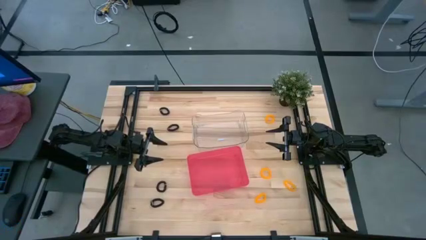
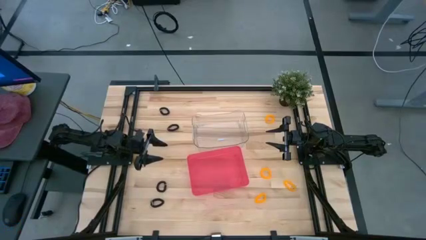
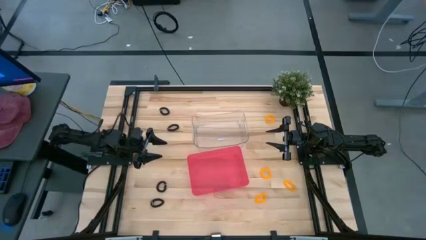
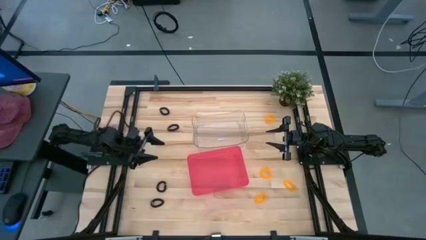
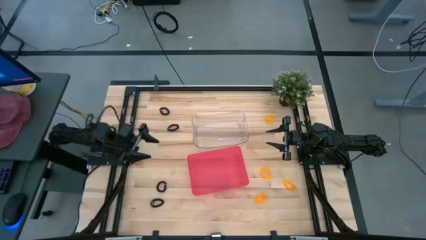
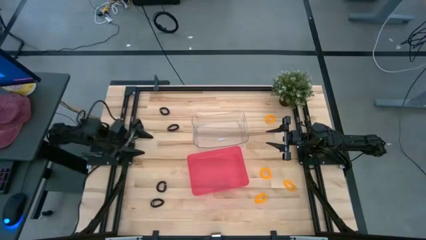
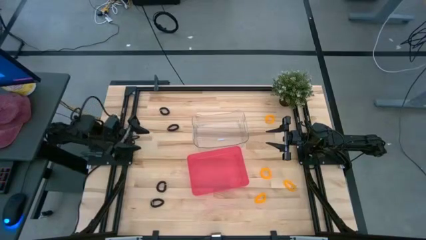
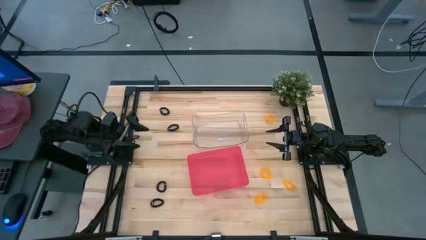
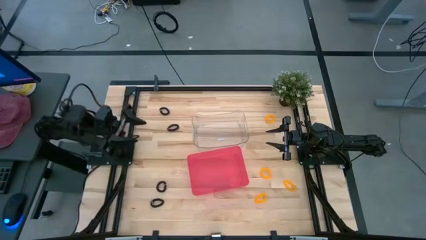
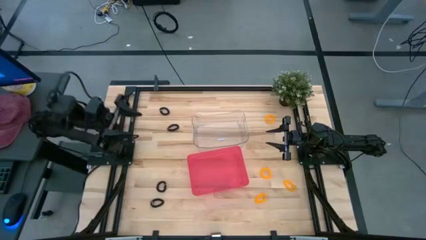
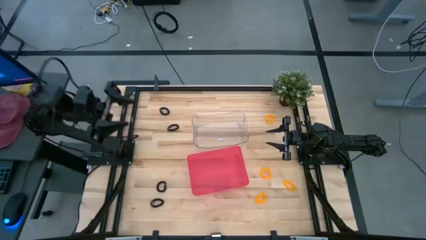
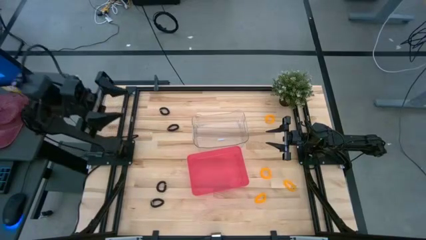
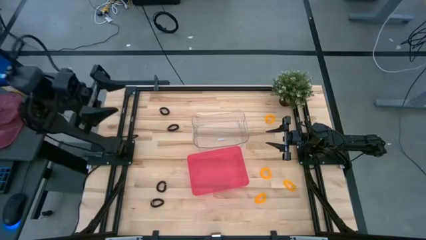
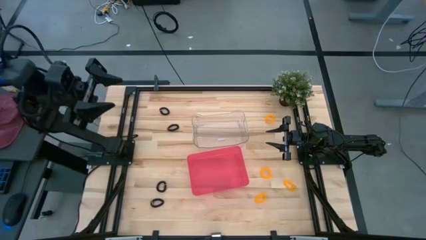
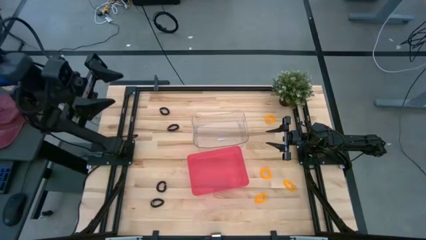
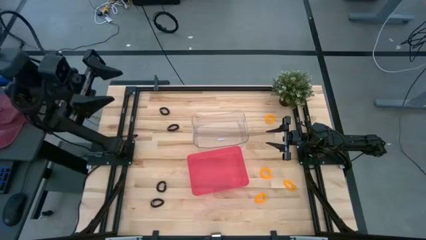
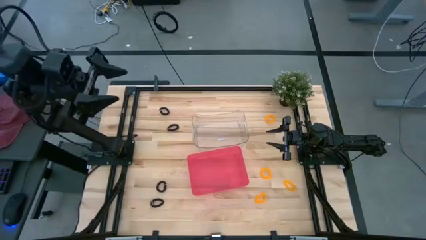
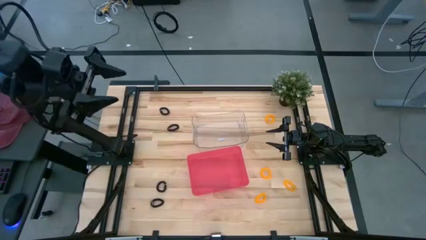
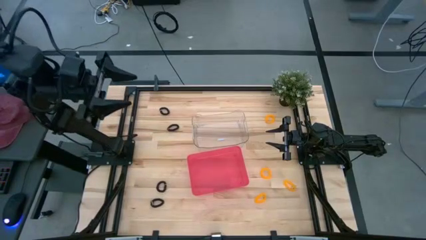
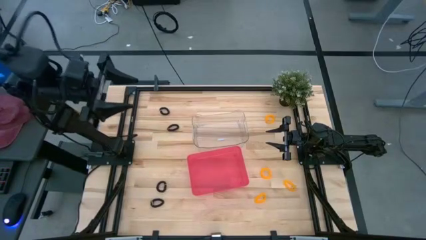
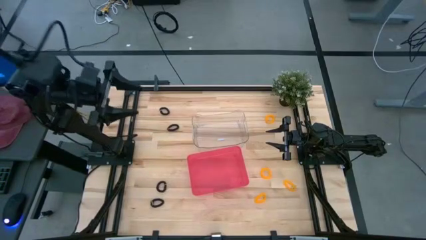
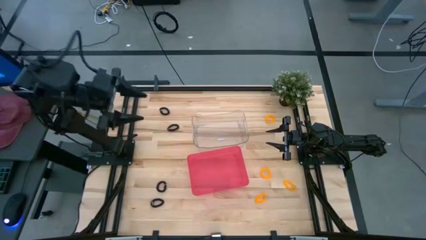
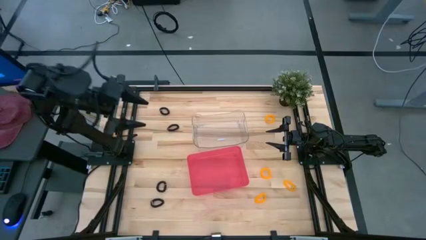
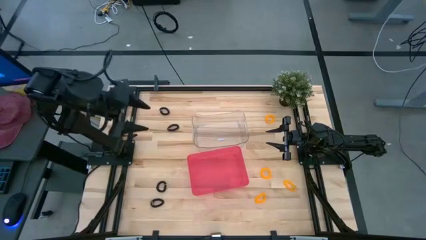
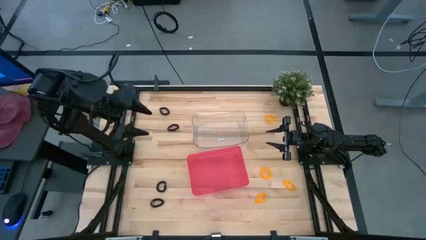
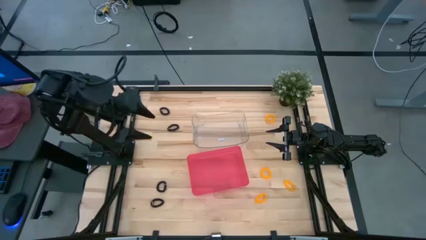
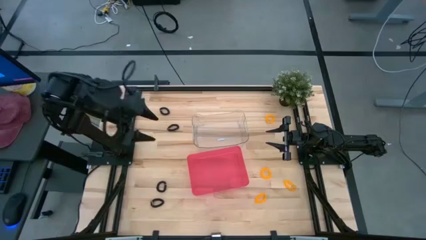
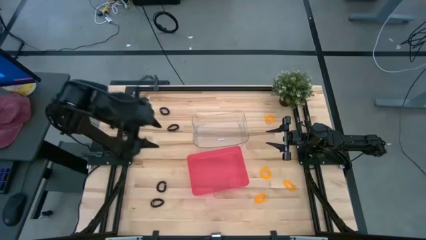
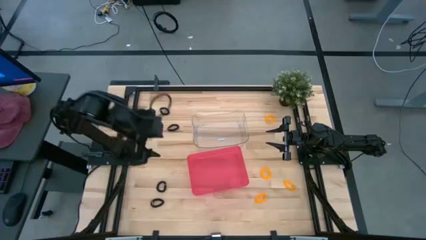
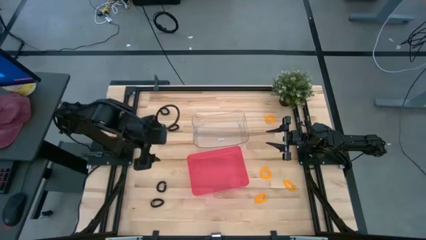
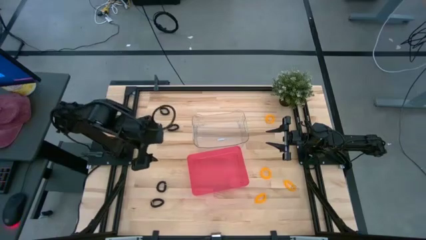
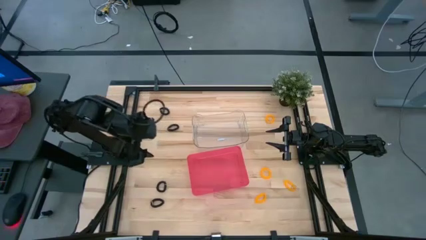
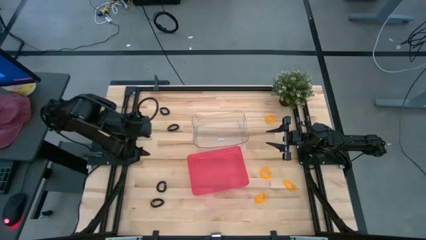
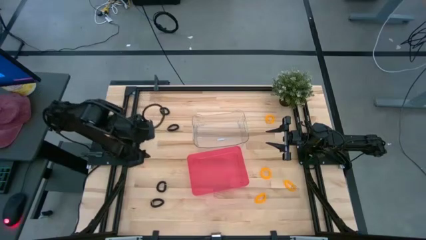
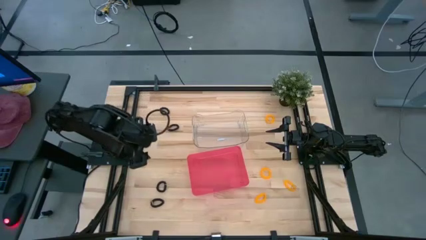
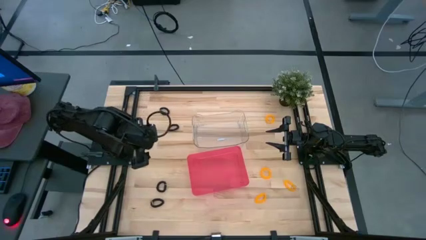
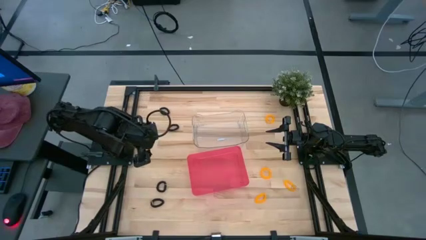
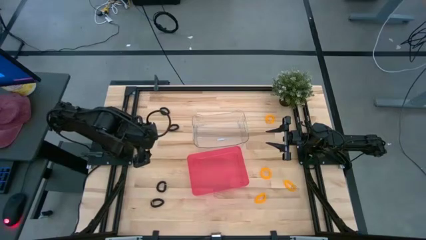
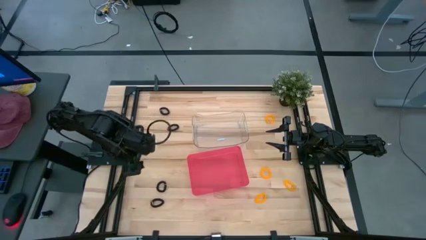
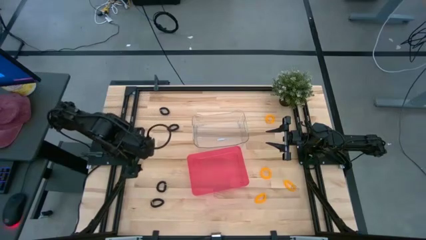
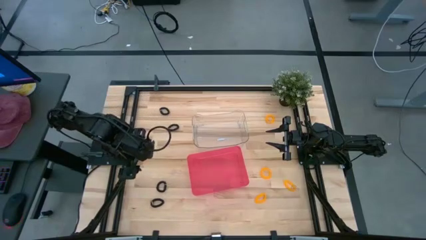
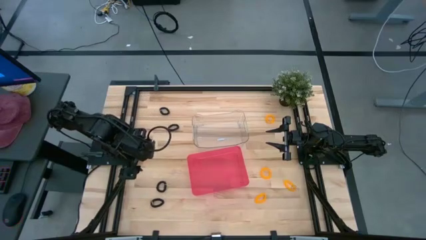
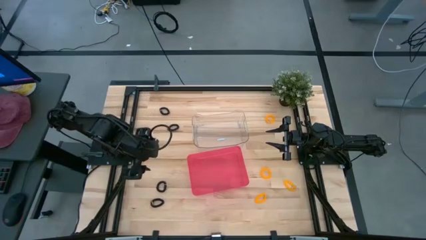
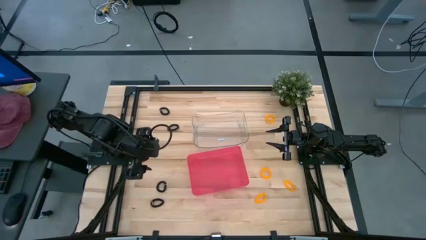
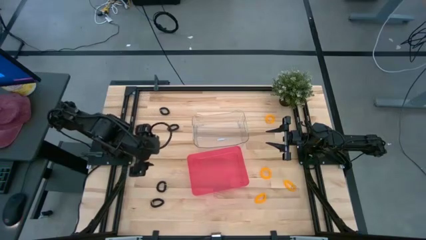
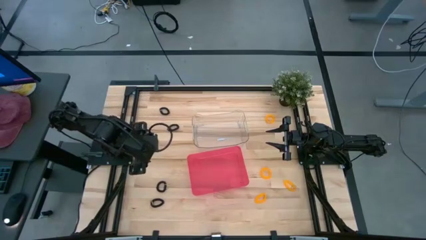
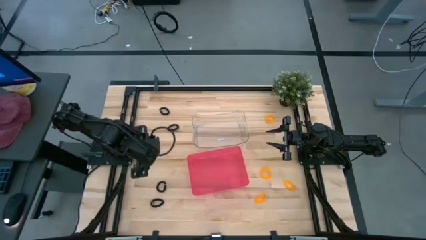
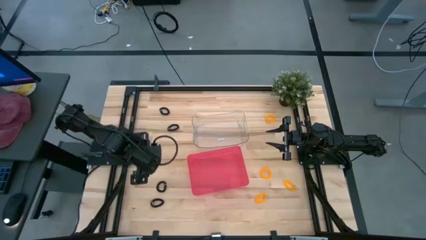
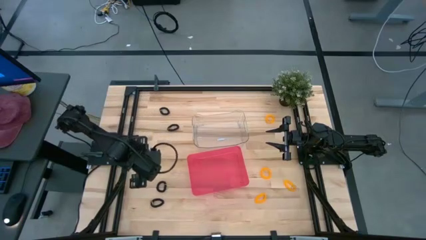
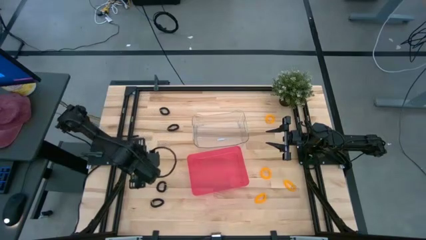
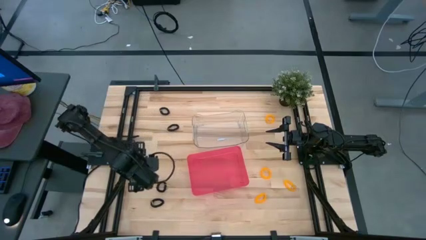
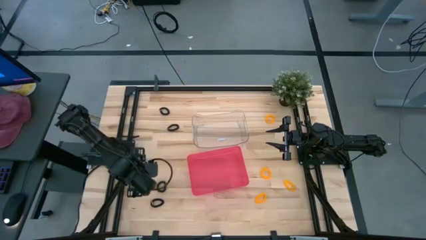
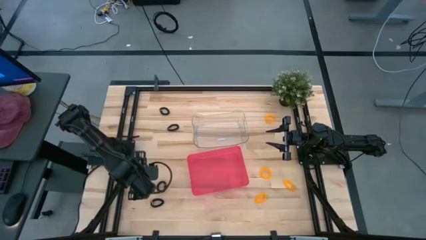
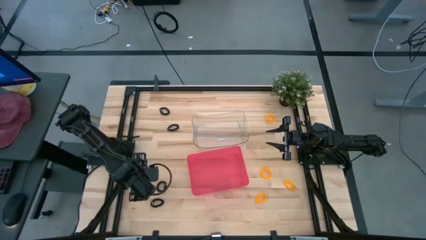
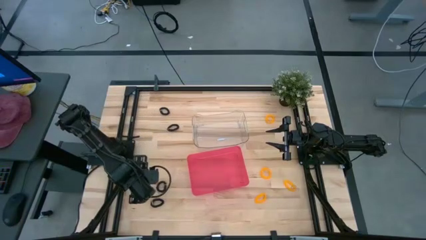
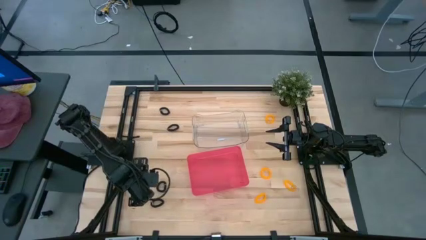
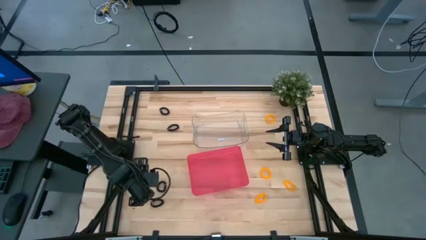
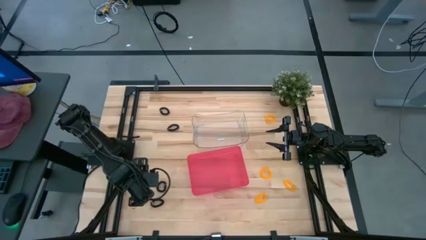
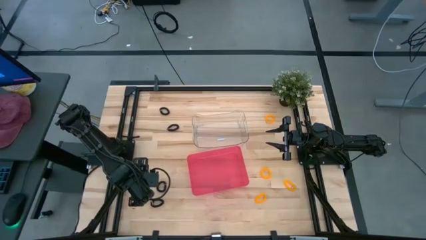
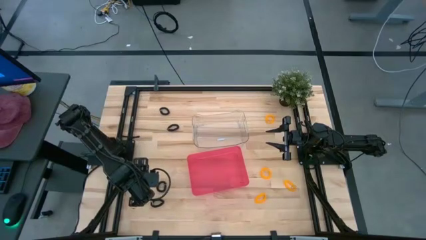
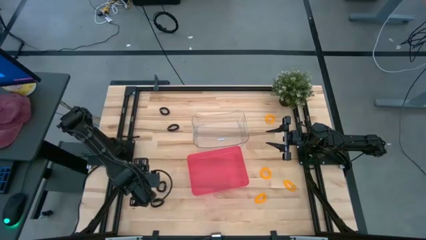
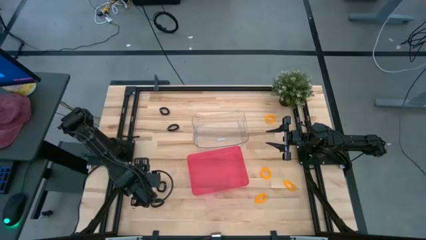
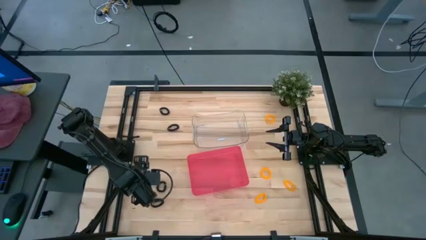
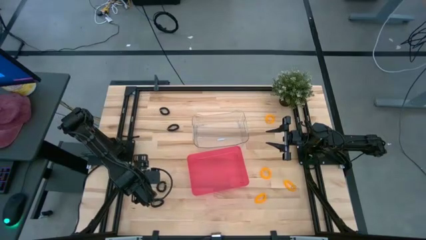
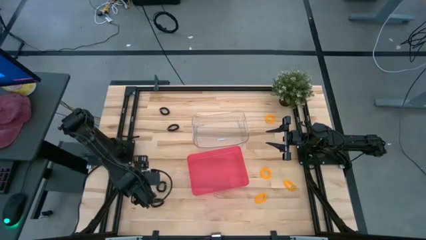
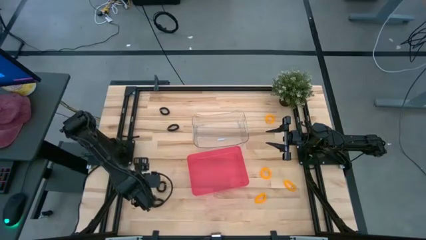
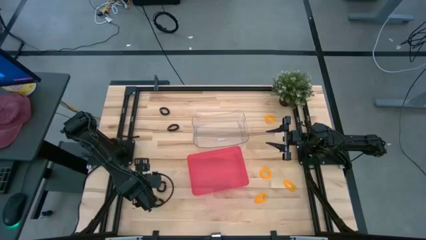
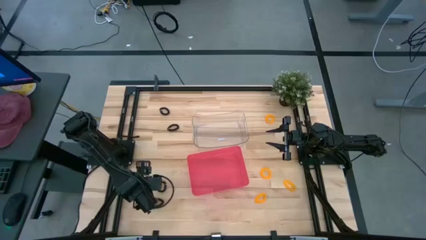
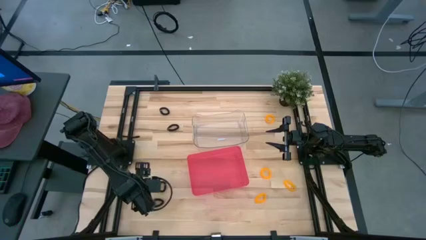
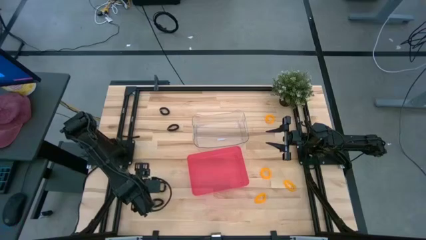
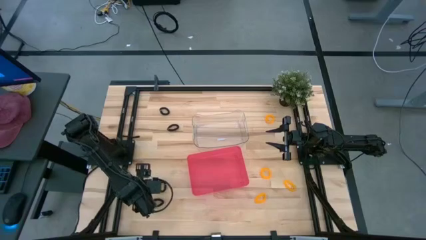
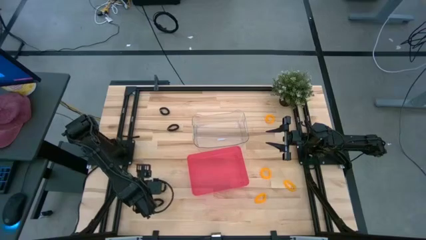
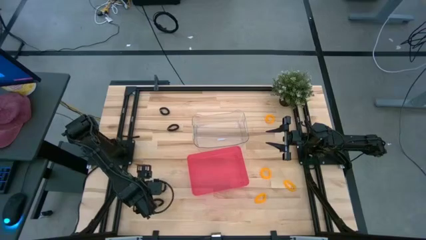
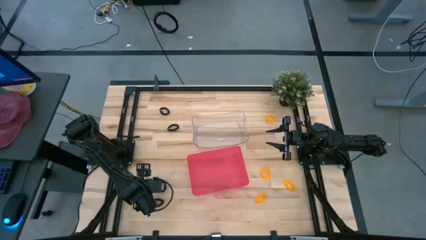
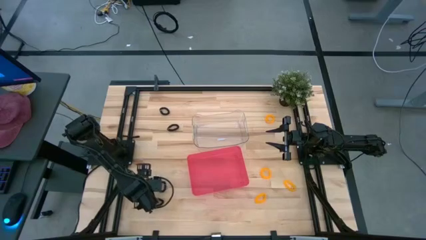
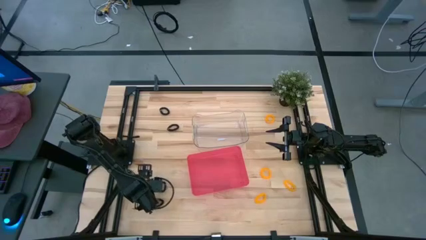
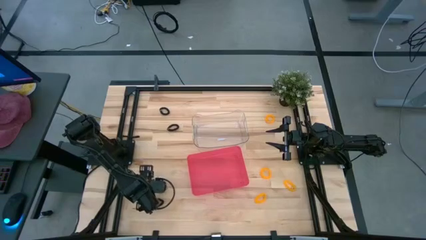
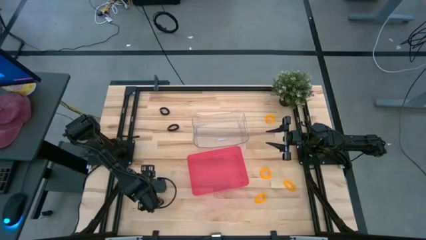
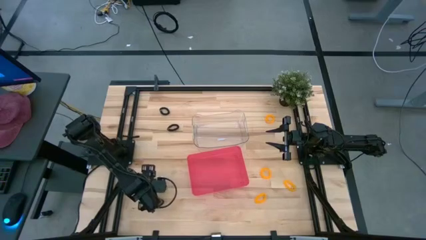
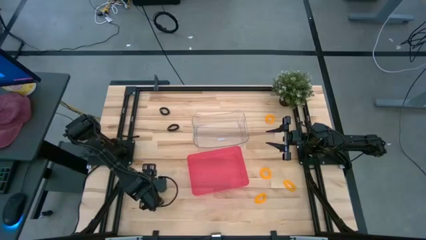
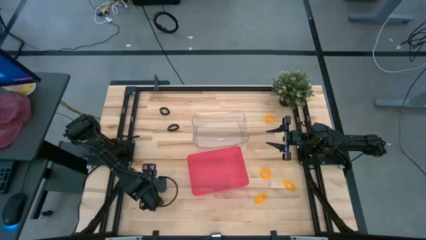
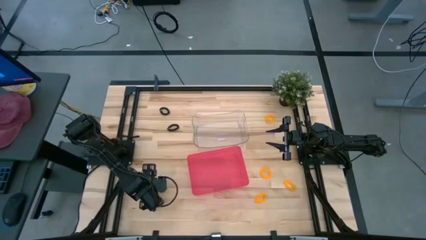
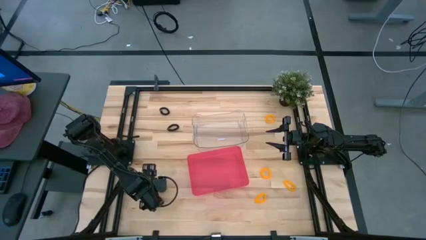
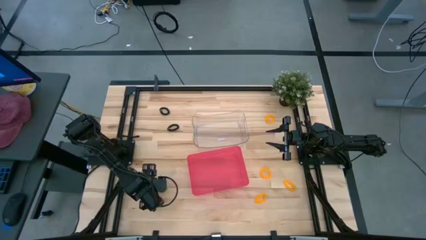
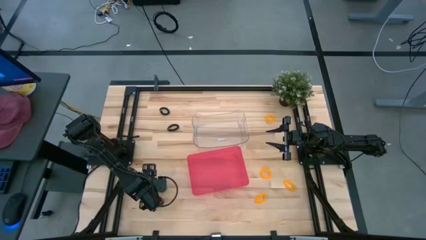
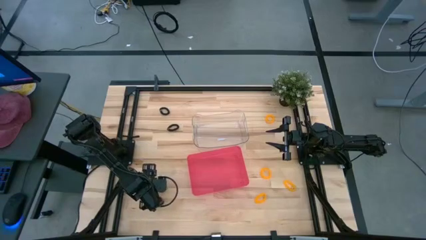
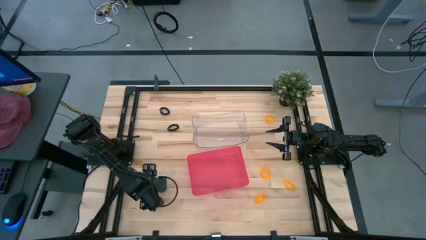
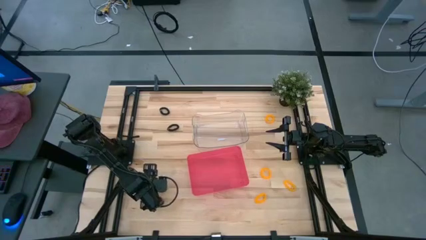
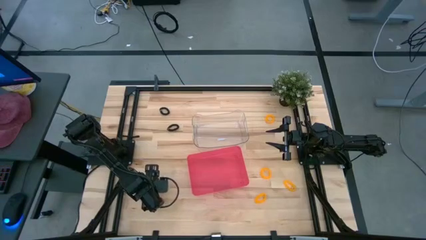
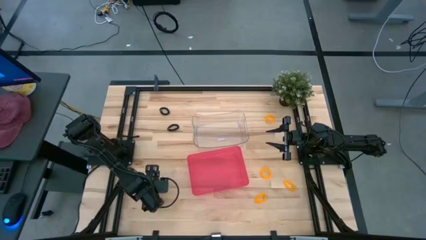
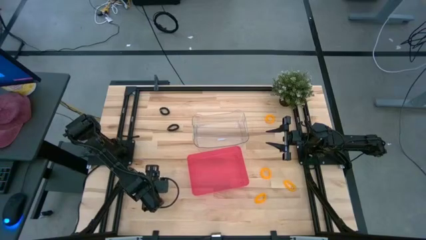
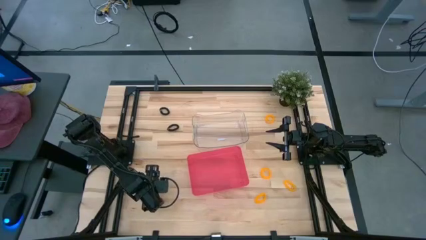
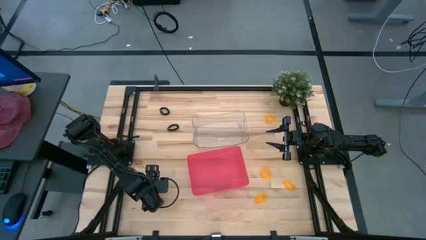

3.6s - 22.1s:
Task: Sort spring keychains
Put the black spring keychain into the red bin
